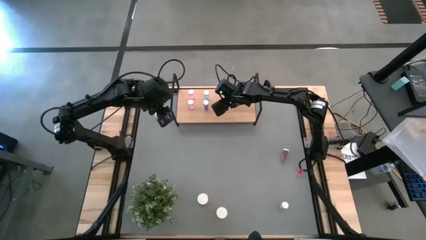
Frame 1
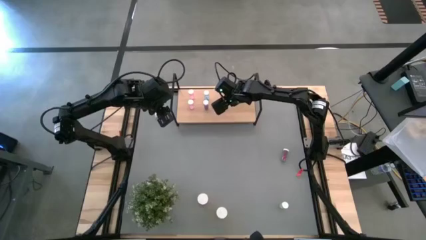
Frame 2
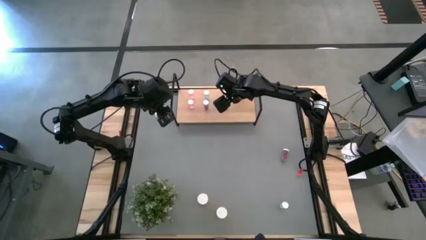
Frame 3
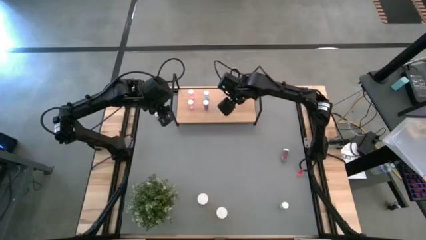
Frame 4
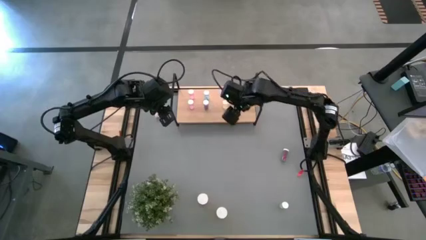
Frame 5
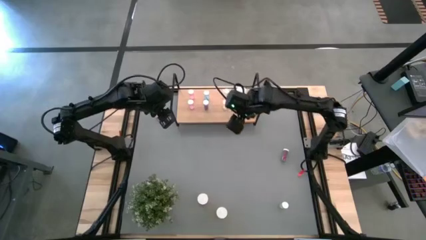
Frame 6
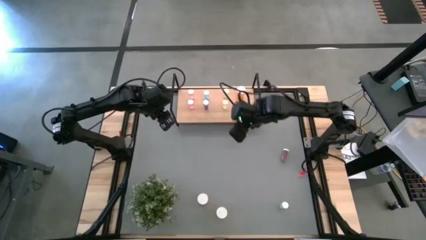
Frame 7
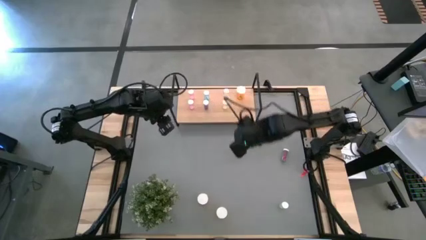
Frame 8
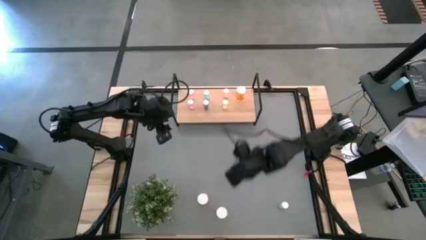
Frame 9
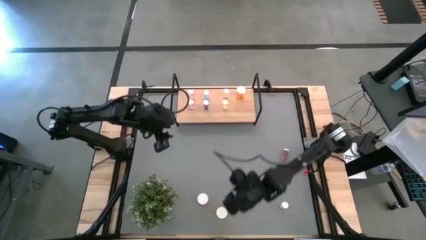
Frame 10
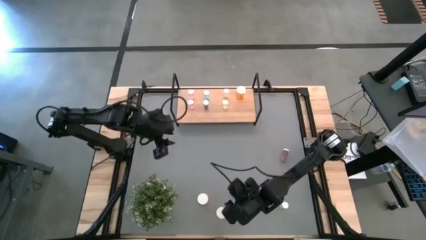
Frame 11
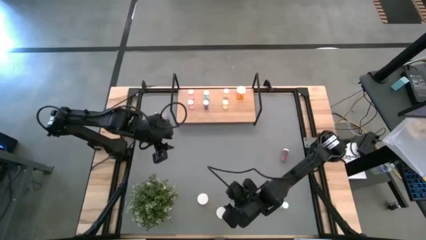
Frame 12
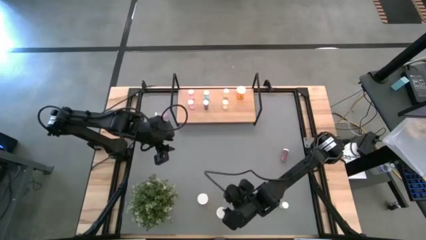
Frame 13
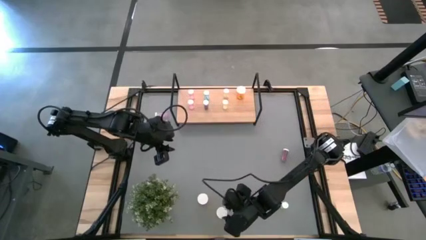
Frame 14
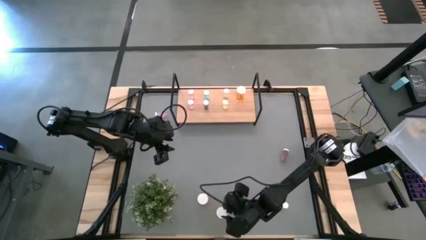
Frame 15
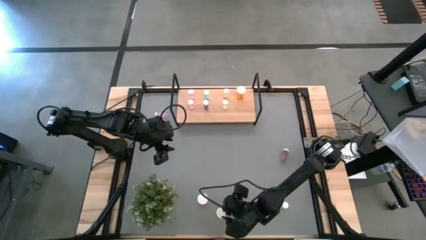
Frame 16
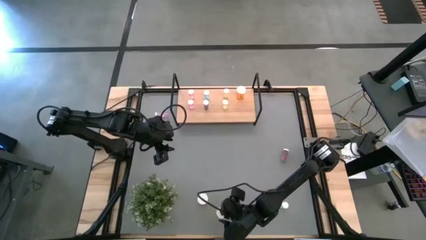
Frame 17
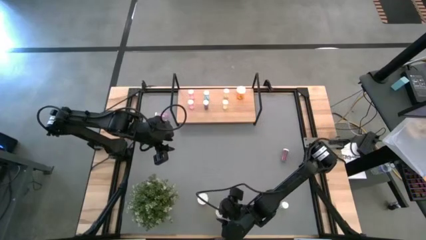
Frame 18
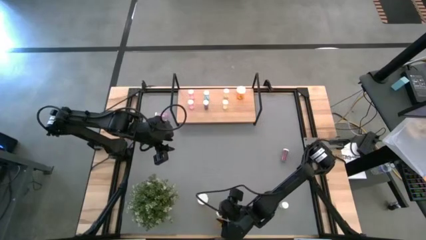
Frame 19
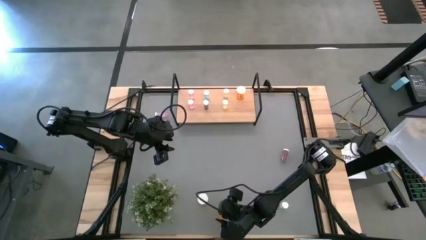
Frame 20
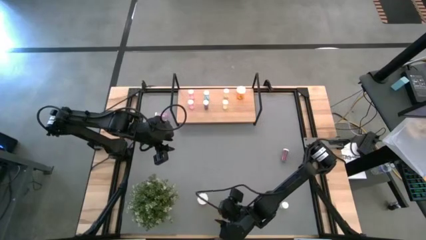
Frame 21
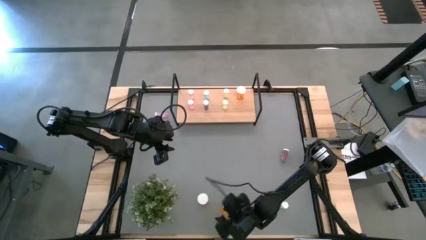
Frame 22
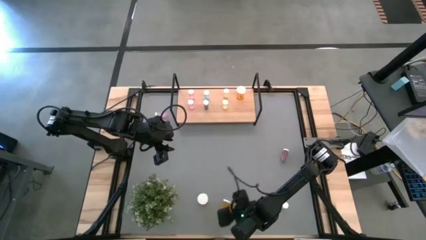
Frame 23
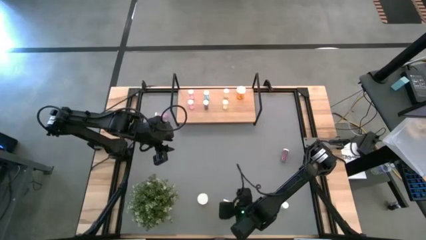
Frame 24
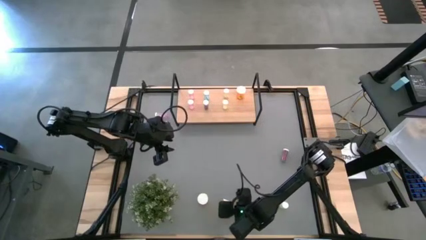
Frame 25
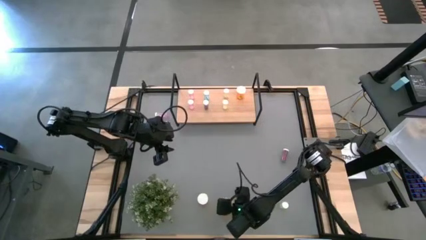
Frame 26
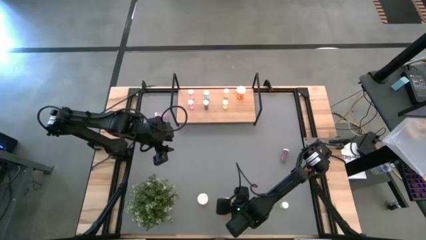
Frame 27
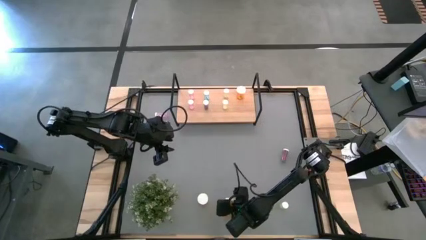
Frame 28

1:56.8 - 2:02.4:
Task: Pick and place medicine bottles onto shelf by color
Put the right orange pill bottle on the shelf aligned with the other orange pill bottle
